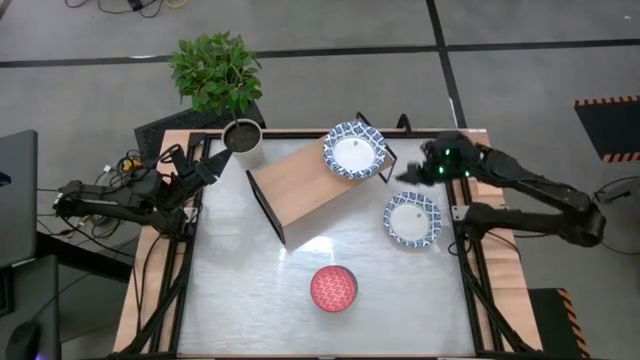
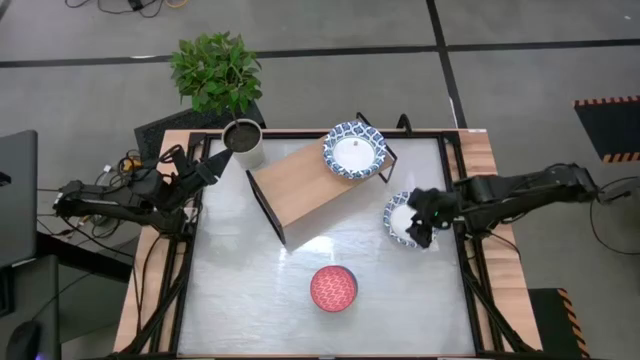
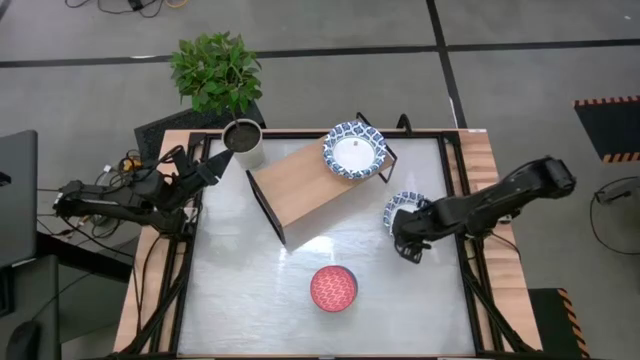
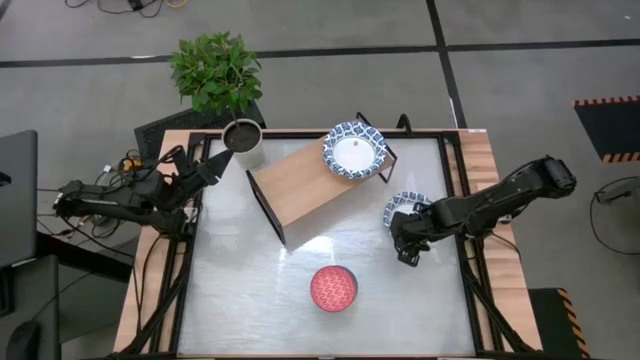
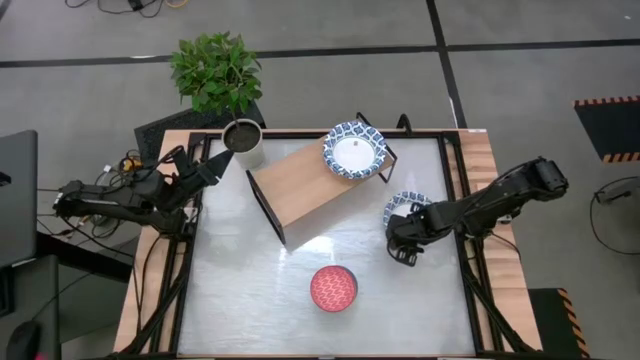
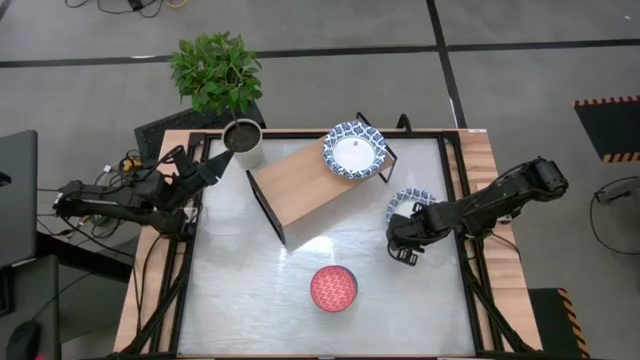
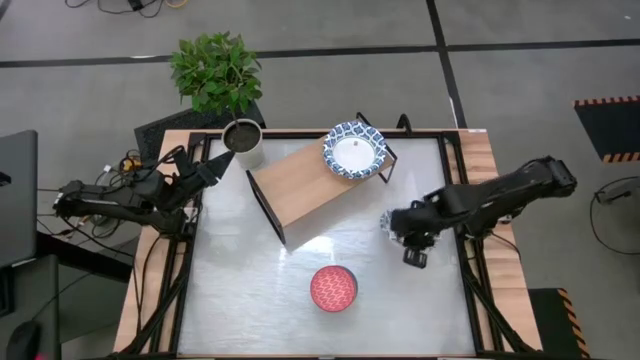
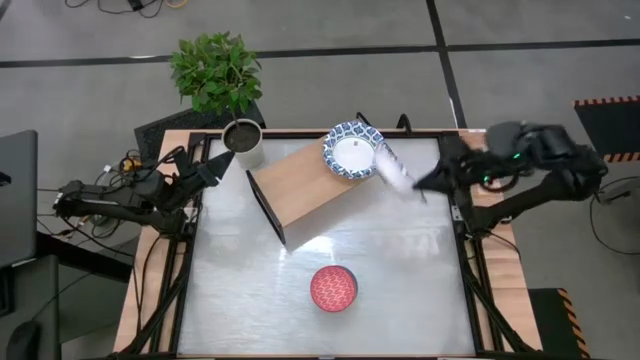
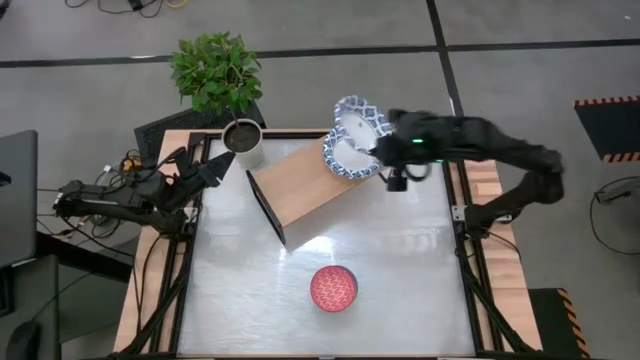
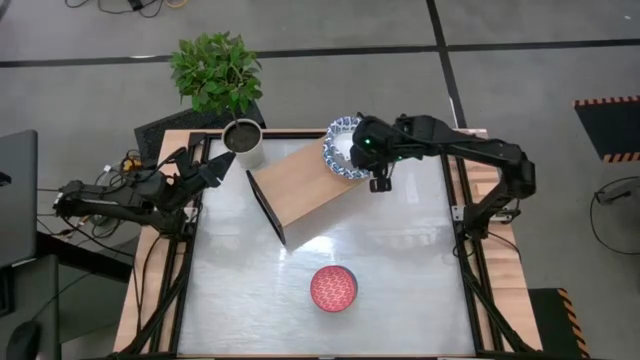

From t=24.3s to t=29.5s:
Task: Place and stack bowls onto a shelf
Stack the white bowl on top of the white bowl on the shelf

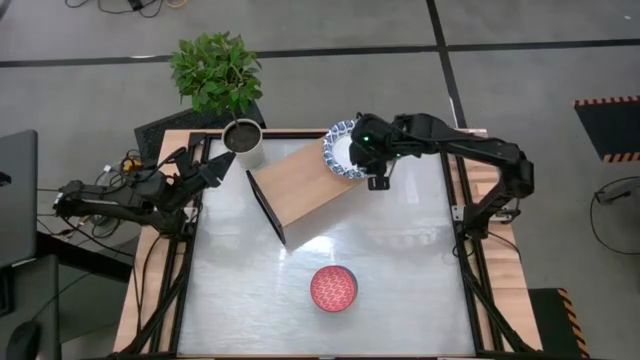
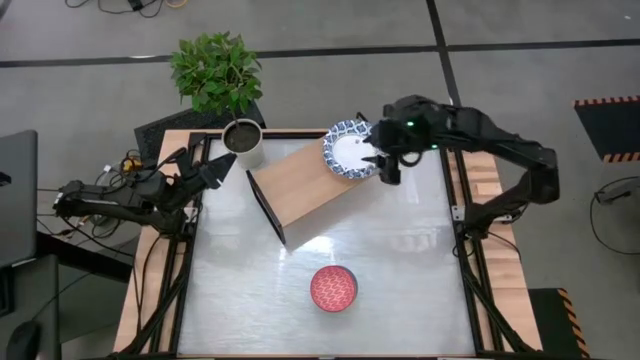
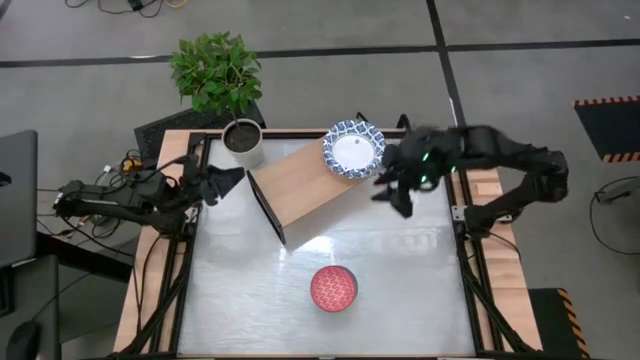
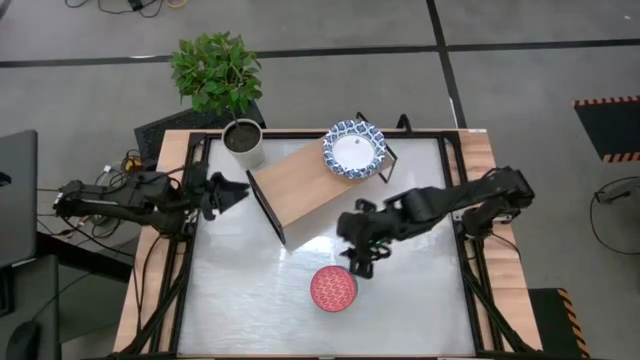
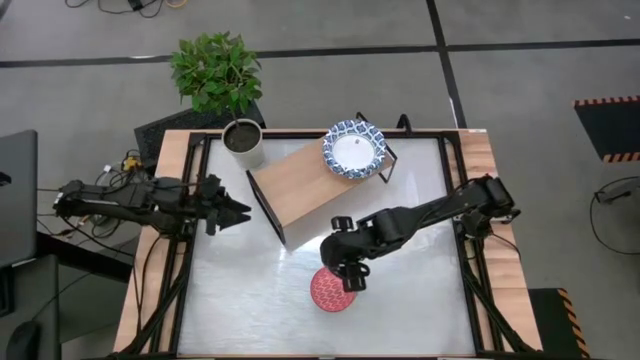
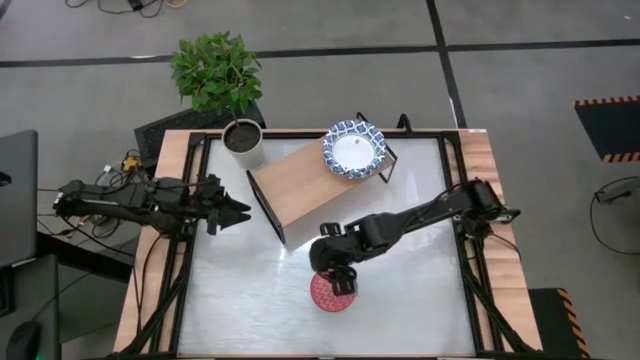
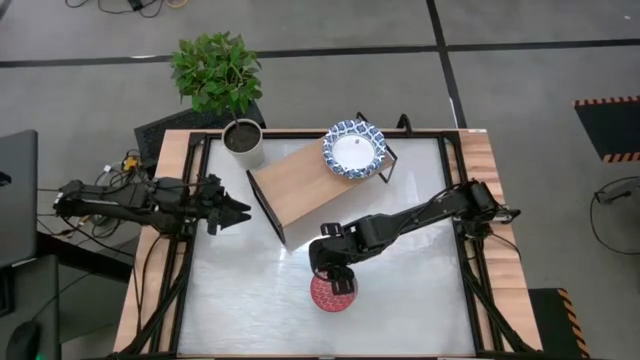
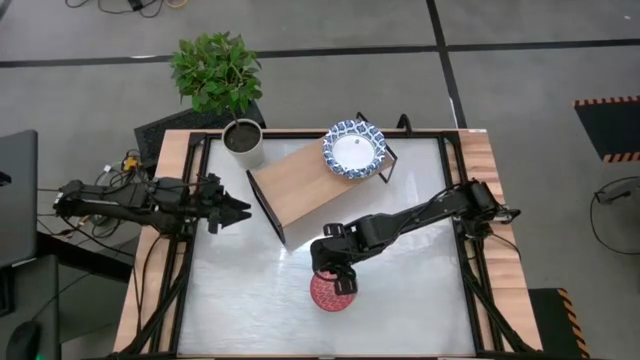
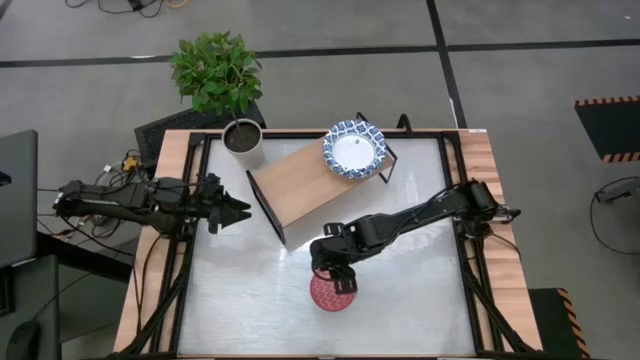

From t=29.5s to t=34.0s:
Put the red bowl on the shelf

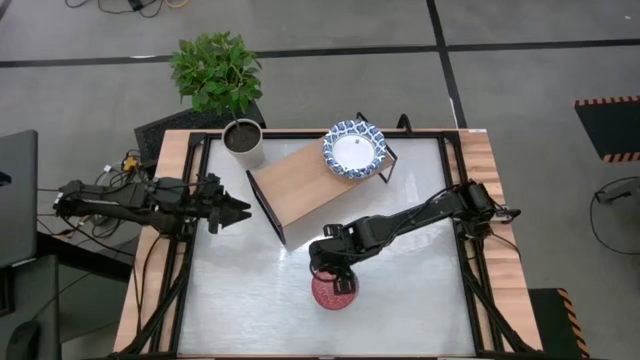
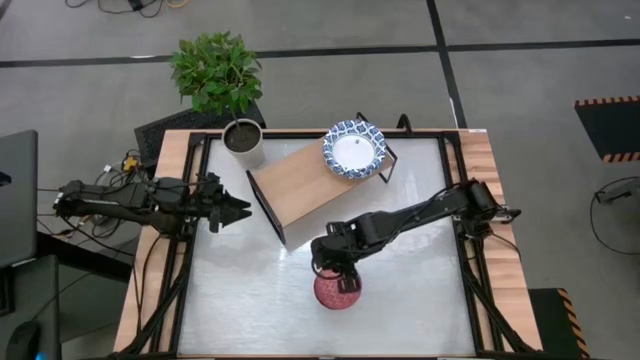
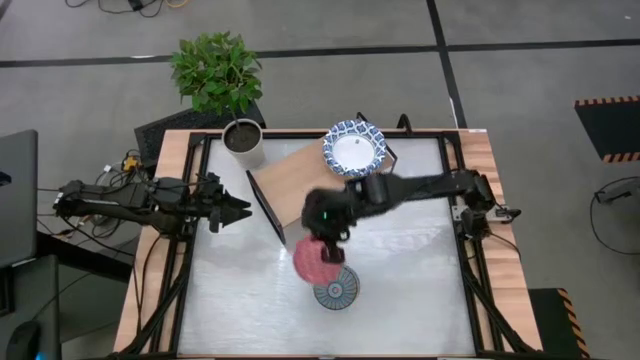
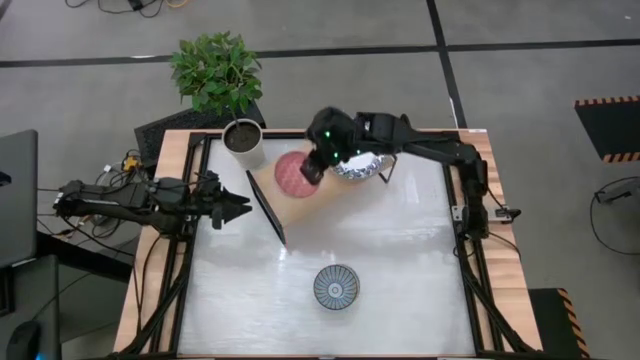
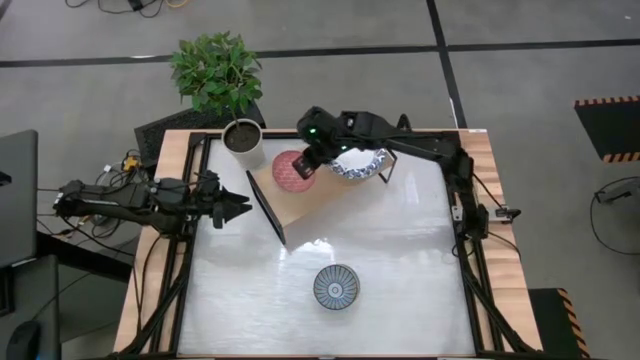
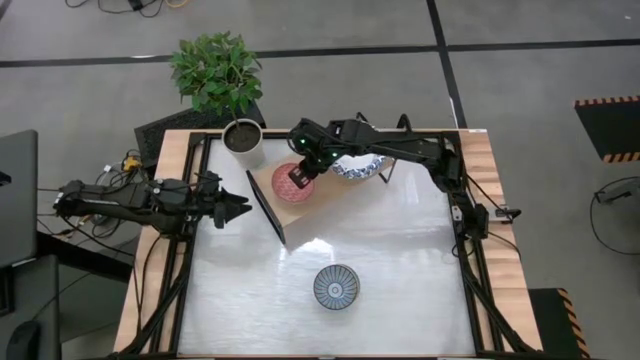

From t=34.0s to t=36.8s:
Put the red bowl on the shelf

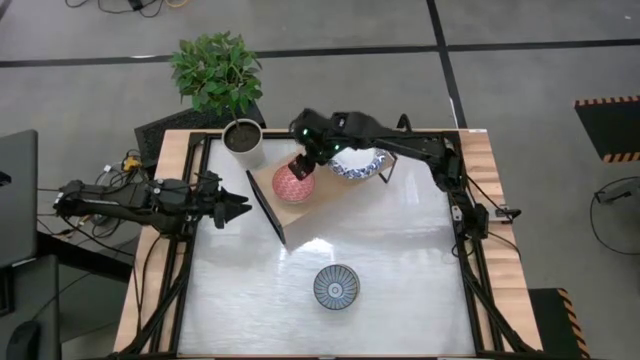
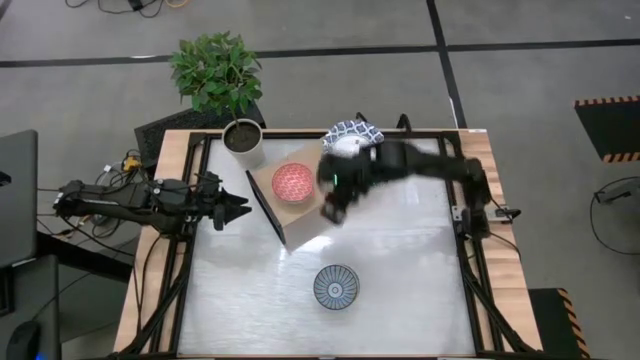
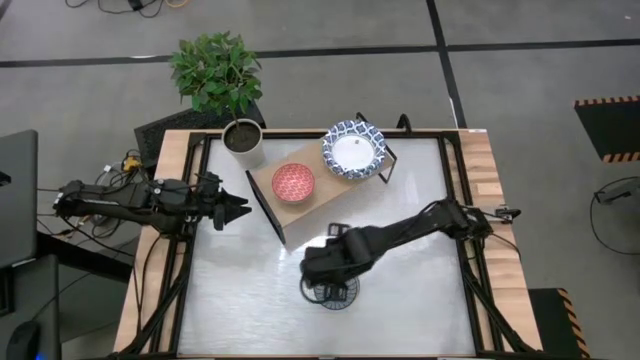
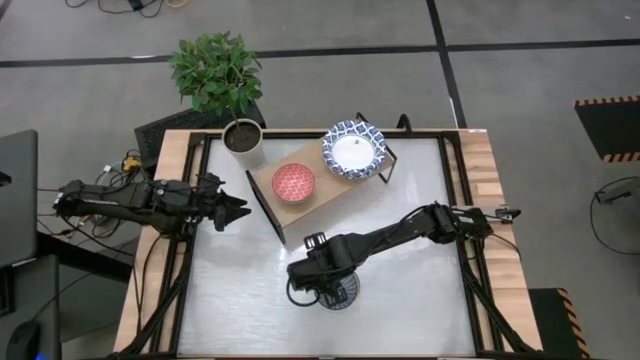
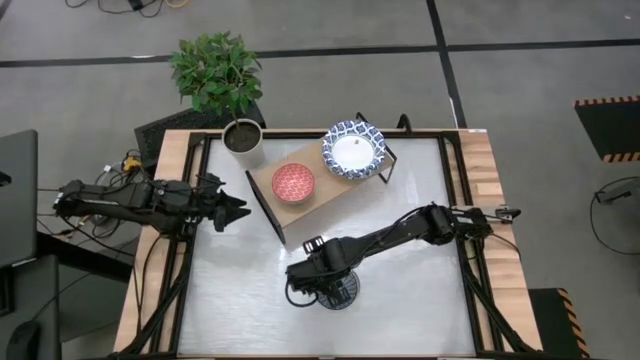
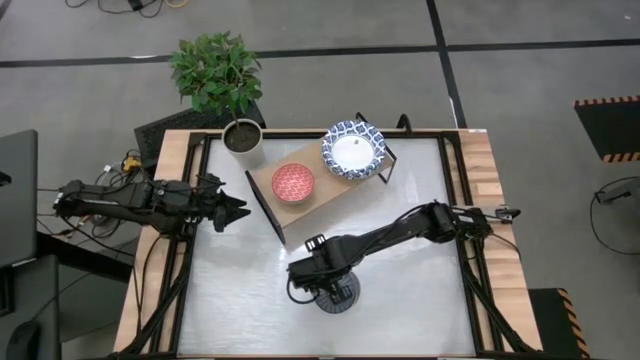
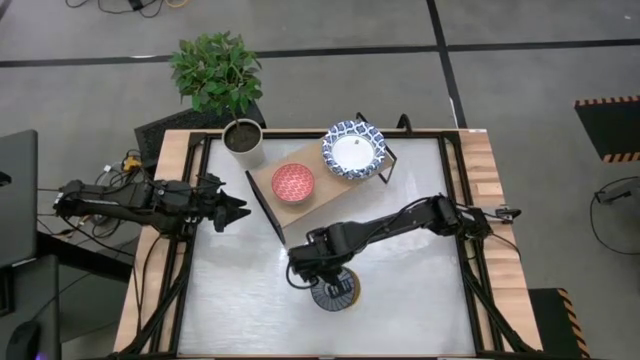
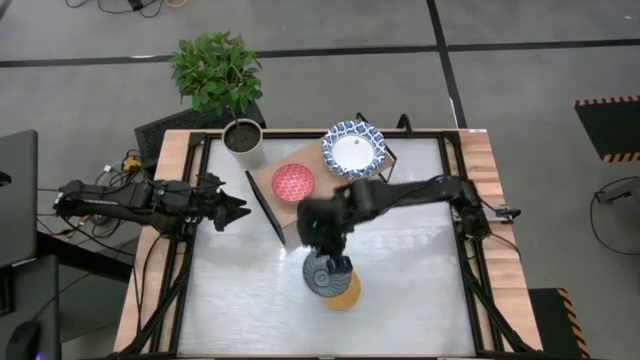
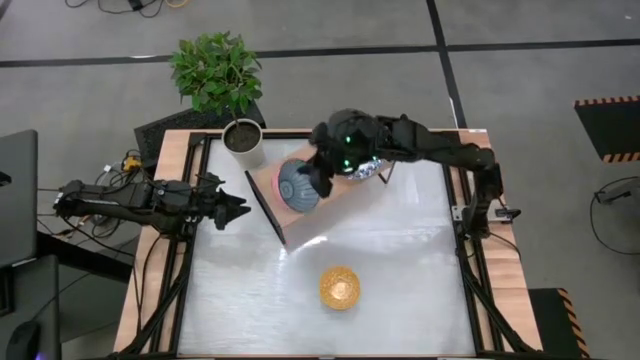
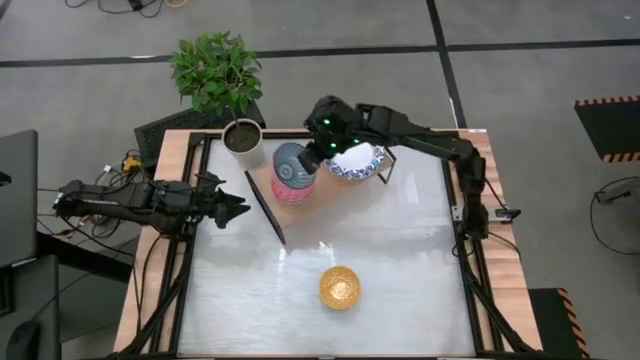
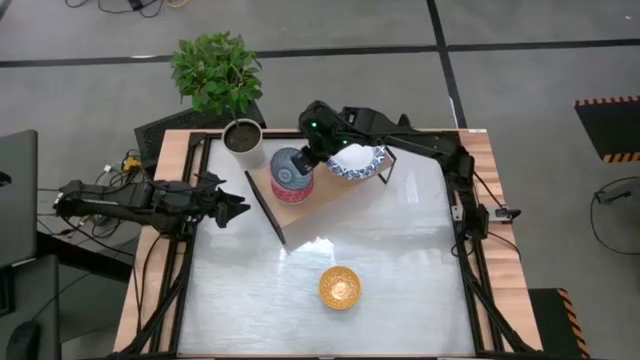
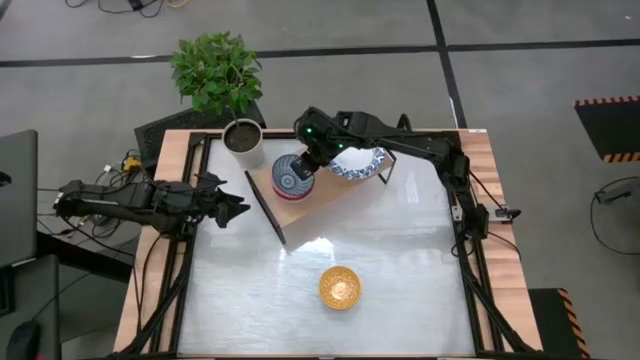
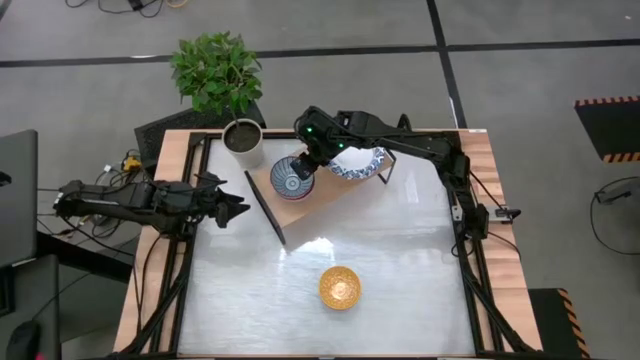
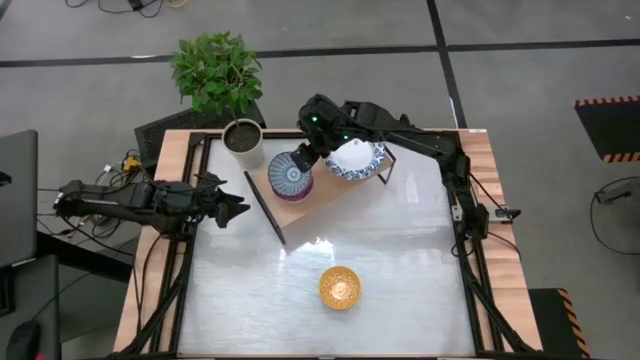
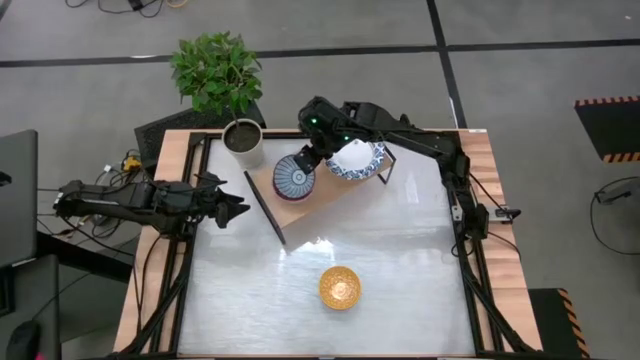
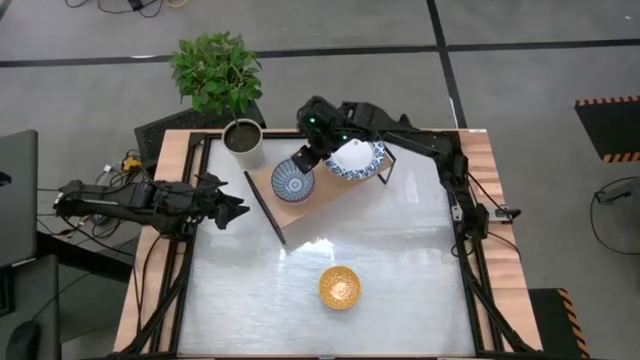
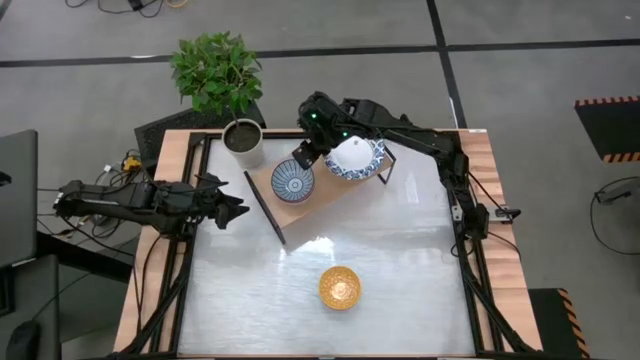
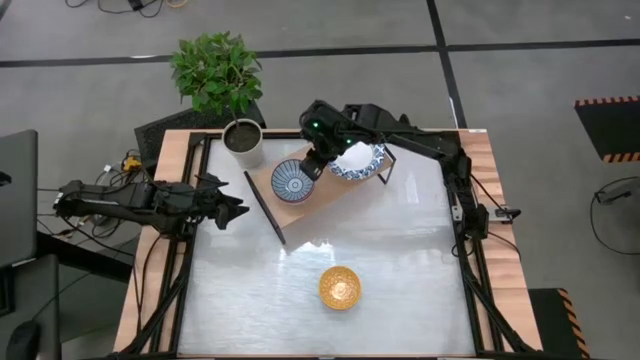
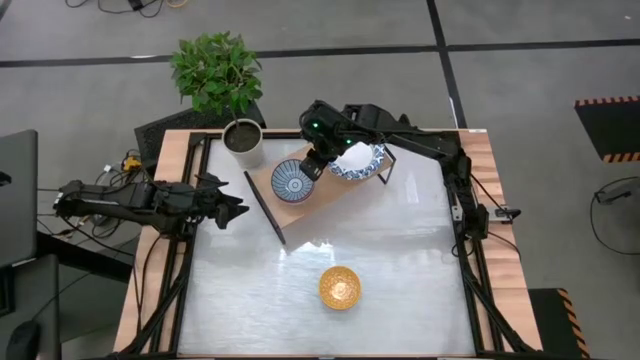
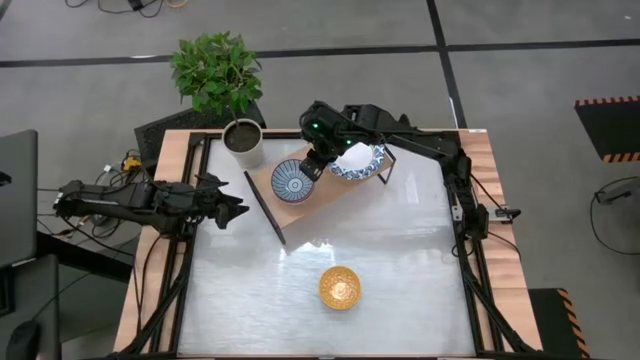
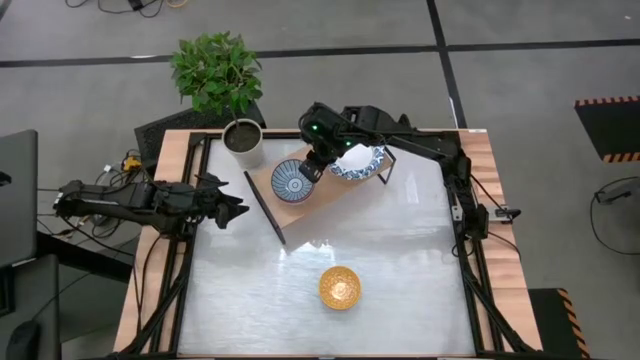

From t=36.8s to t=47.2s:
Stack the dark blue bowl on top of the red bowl on the shelf
